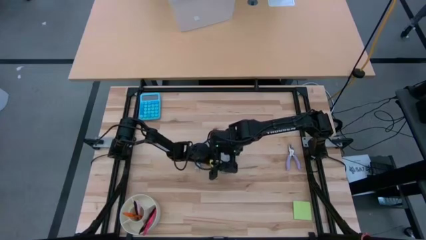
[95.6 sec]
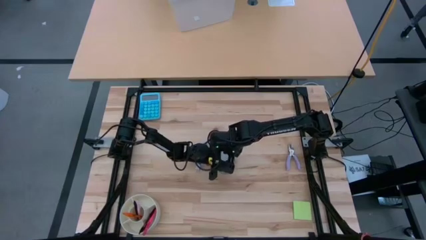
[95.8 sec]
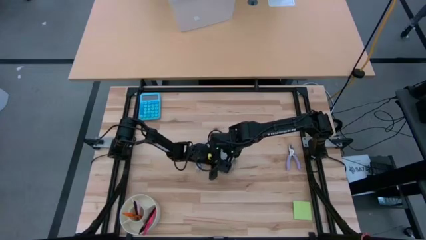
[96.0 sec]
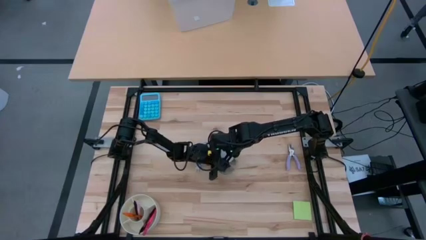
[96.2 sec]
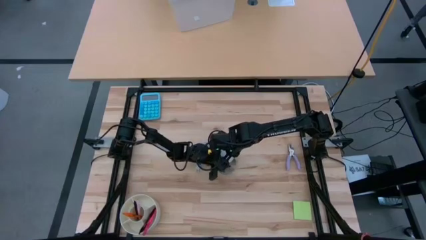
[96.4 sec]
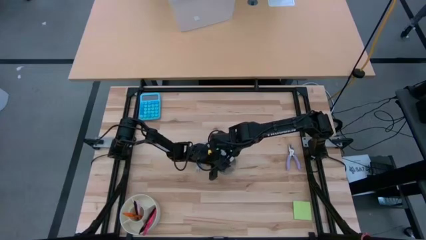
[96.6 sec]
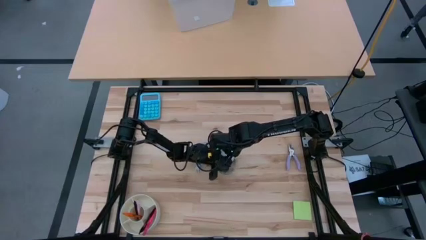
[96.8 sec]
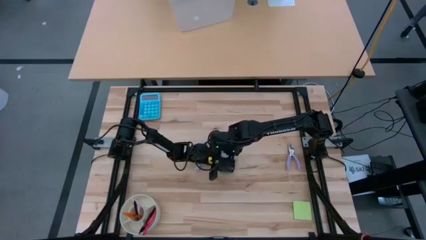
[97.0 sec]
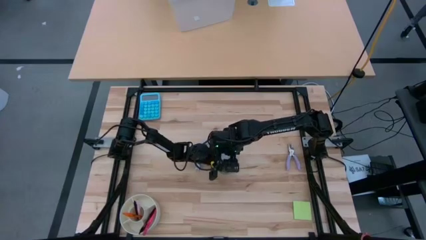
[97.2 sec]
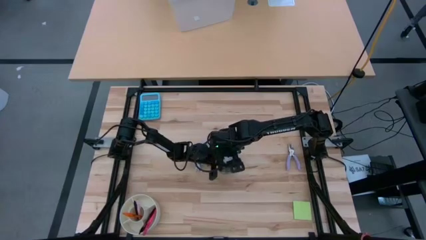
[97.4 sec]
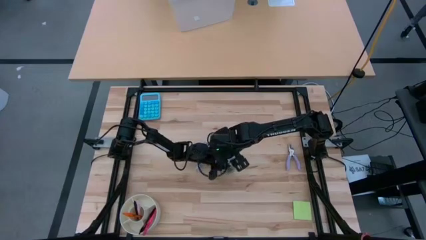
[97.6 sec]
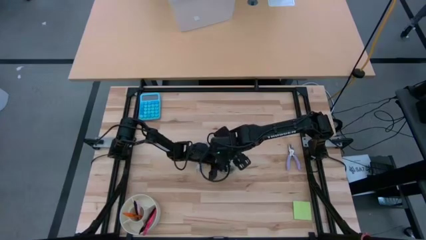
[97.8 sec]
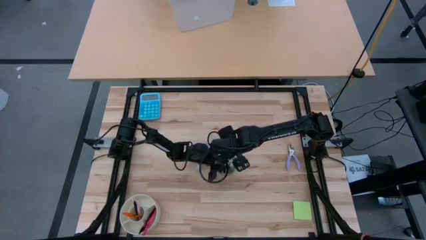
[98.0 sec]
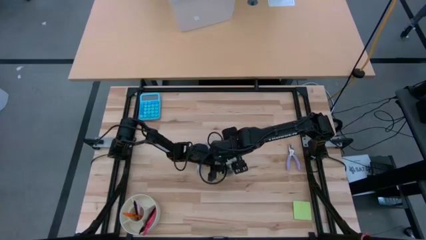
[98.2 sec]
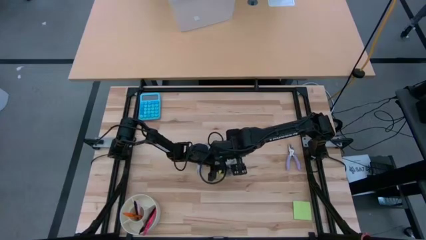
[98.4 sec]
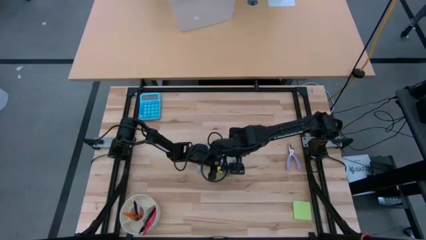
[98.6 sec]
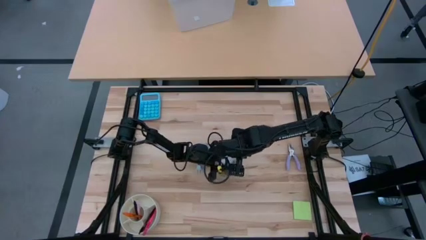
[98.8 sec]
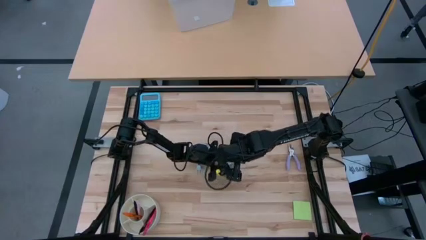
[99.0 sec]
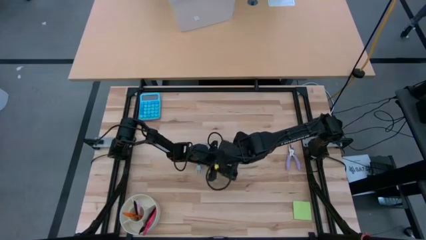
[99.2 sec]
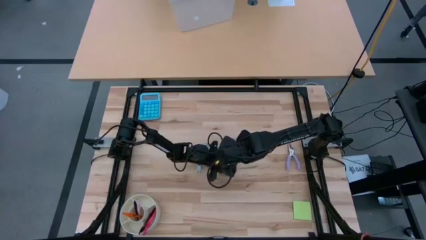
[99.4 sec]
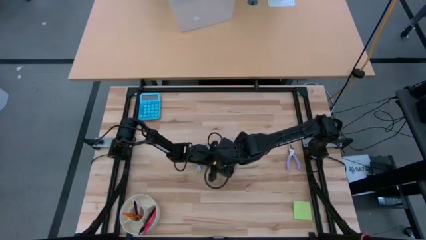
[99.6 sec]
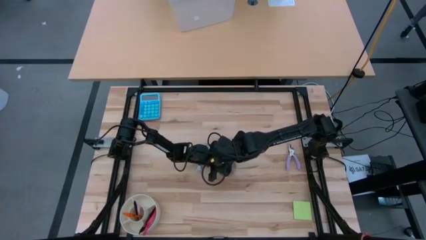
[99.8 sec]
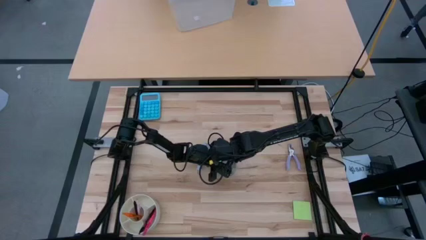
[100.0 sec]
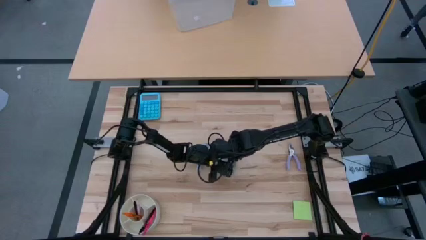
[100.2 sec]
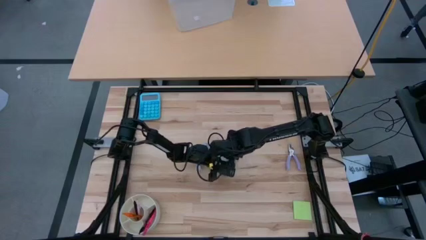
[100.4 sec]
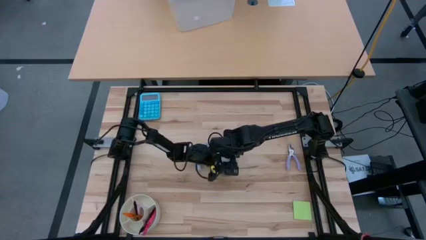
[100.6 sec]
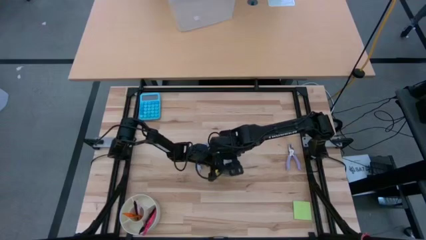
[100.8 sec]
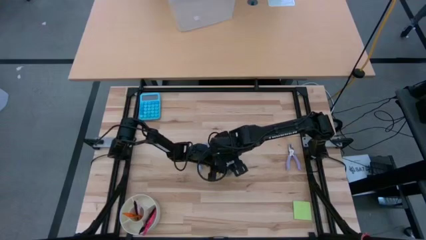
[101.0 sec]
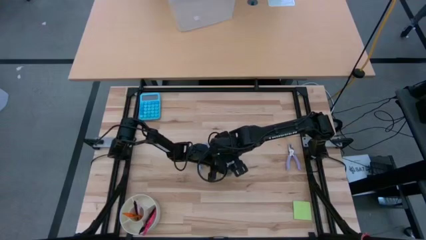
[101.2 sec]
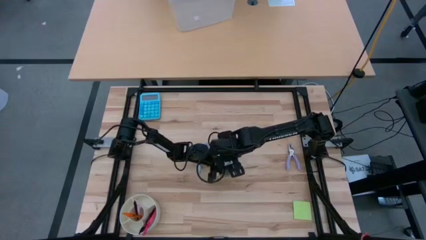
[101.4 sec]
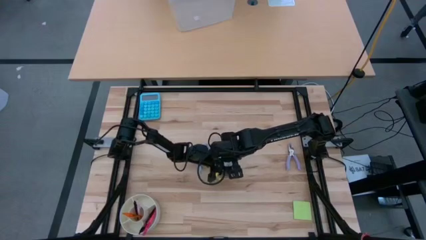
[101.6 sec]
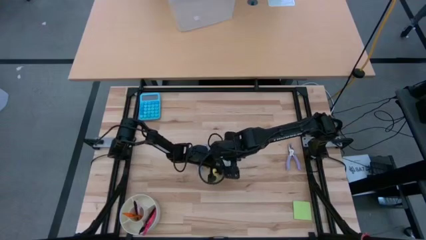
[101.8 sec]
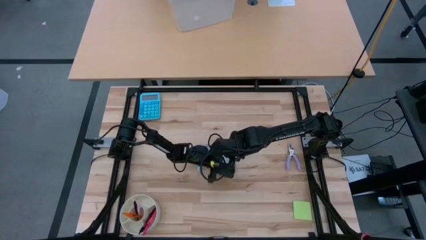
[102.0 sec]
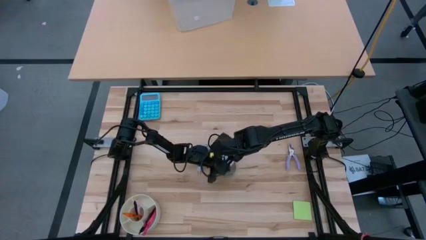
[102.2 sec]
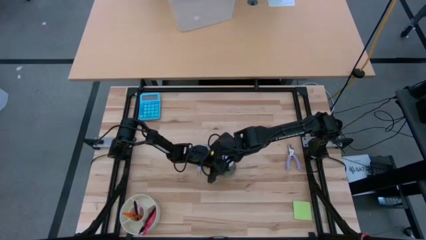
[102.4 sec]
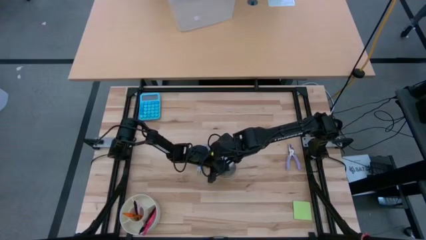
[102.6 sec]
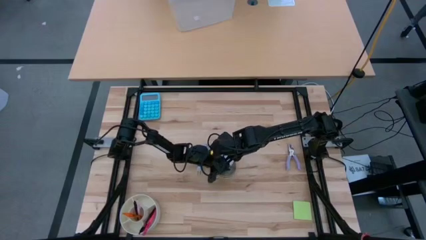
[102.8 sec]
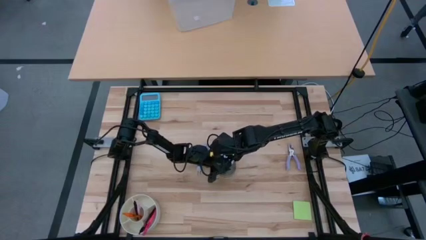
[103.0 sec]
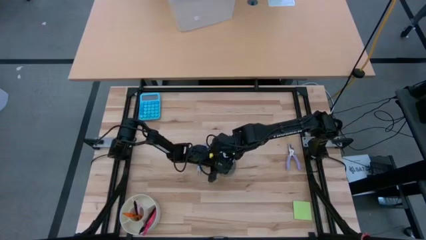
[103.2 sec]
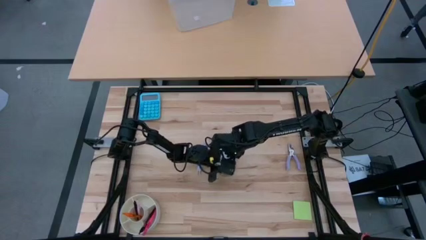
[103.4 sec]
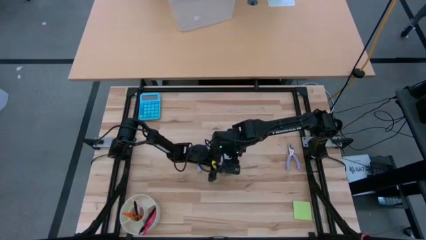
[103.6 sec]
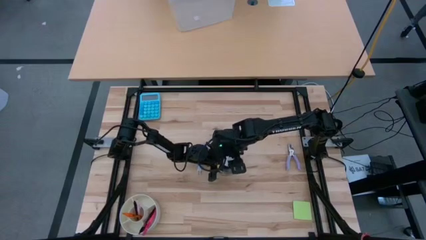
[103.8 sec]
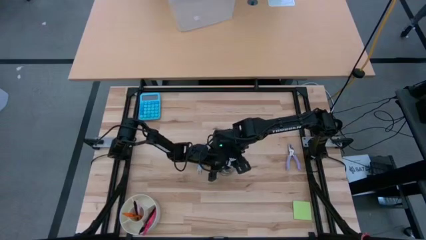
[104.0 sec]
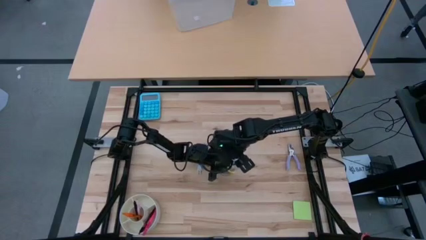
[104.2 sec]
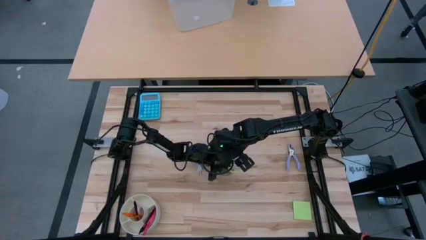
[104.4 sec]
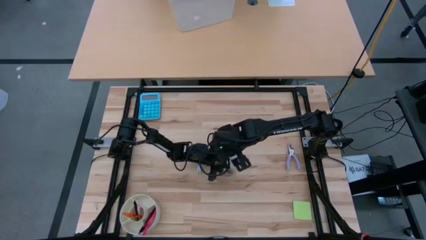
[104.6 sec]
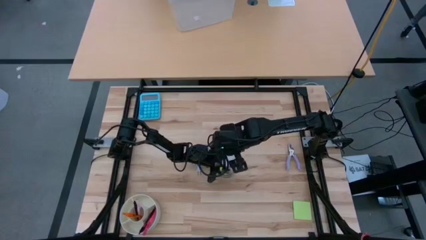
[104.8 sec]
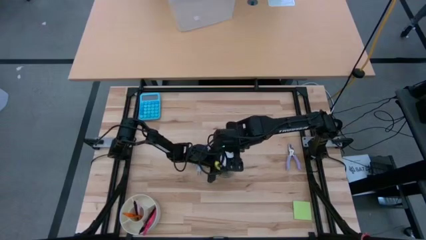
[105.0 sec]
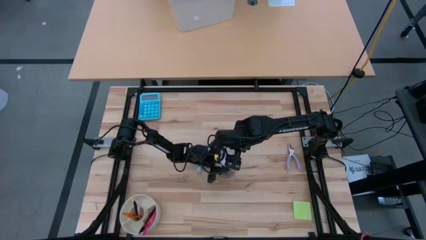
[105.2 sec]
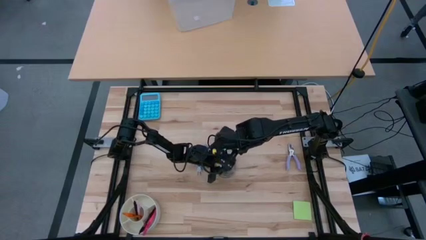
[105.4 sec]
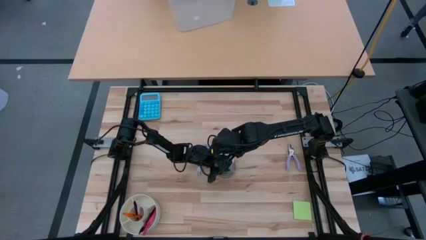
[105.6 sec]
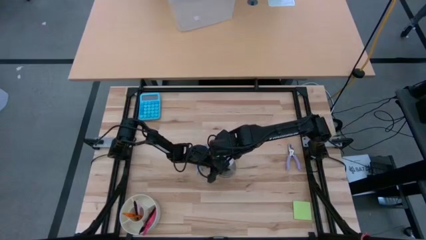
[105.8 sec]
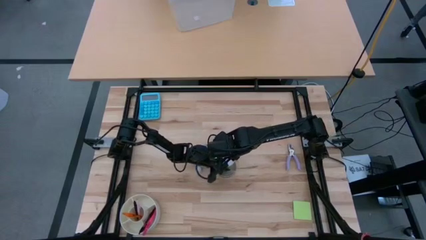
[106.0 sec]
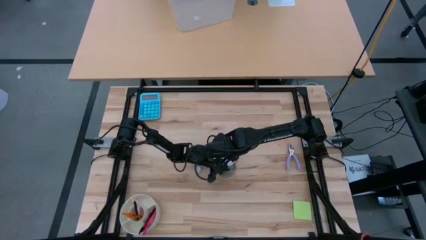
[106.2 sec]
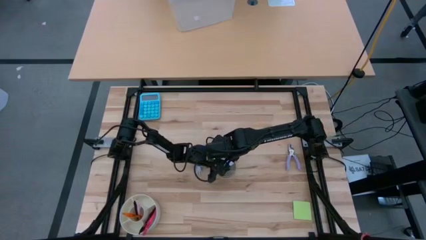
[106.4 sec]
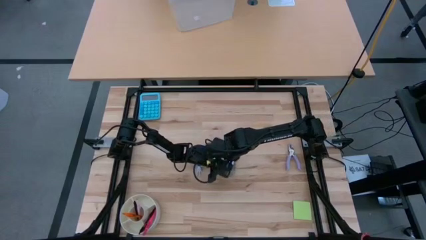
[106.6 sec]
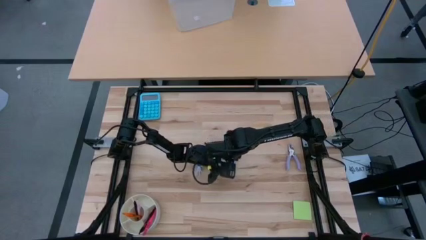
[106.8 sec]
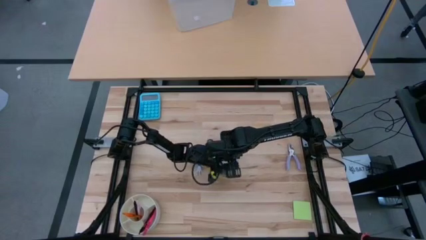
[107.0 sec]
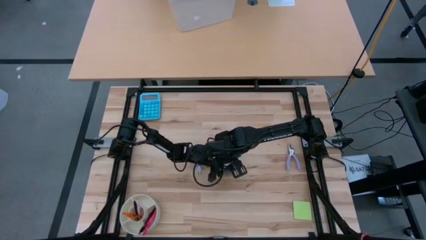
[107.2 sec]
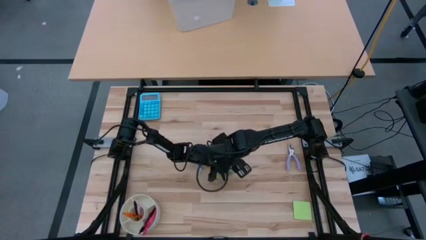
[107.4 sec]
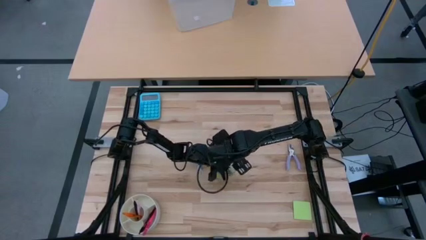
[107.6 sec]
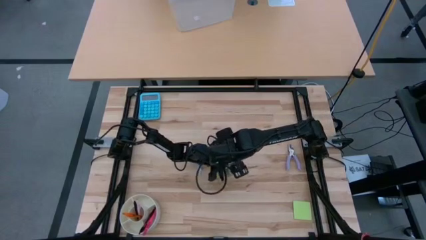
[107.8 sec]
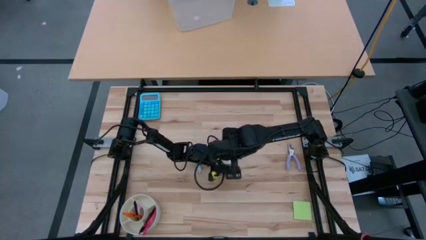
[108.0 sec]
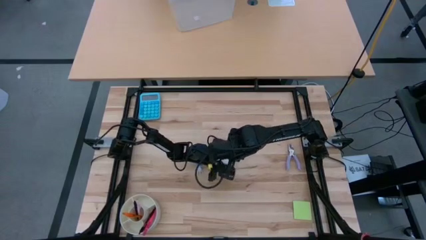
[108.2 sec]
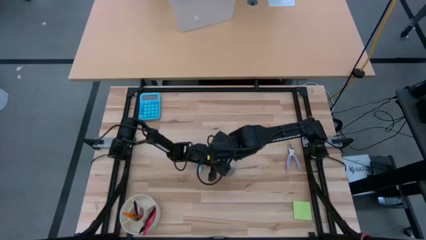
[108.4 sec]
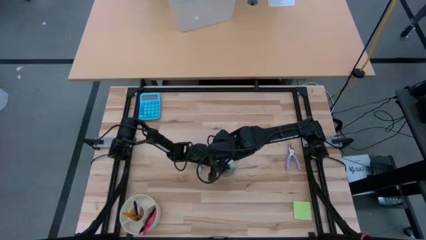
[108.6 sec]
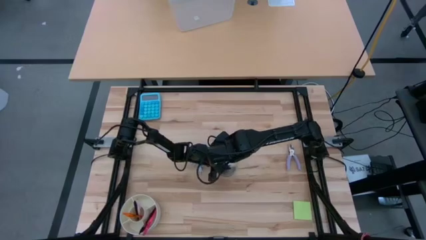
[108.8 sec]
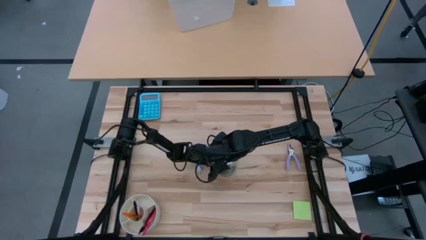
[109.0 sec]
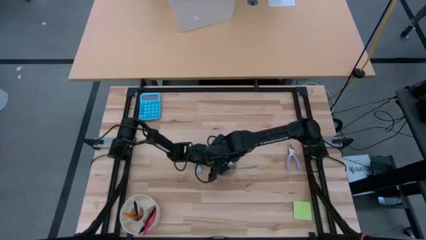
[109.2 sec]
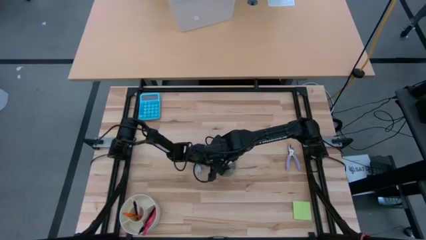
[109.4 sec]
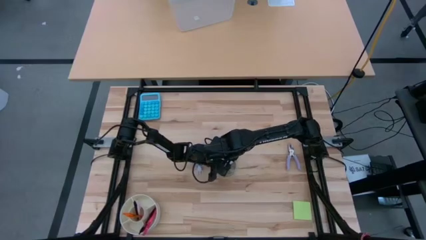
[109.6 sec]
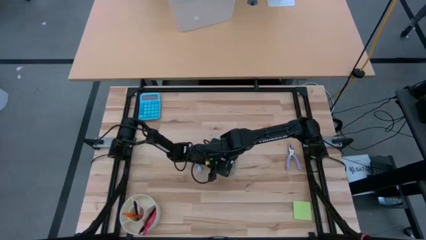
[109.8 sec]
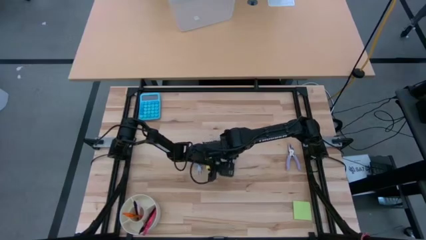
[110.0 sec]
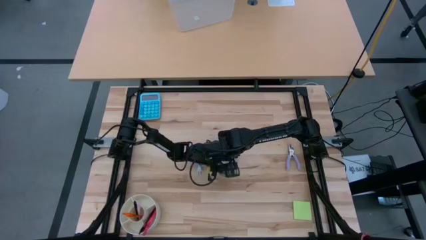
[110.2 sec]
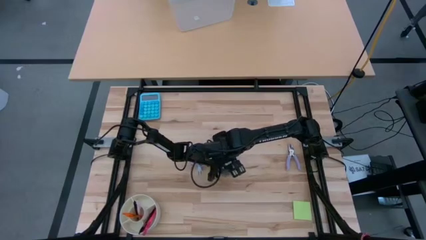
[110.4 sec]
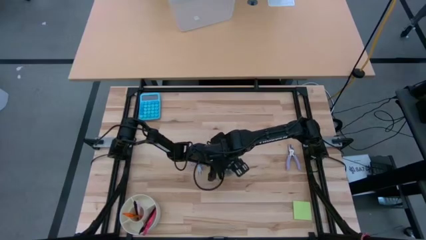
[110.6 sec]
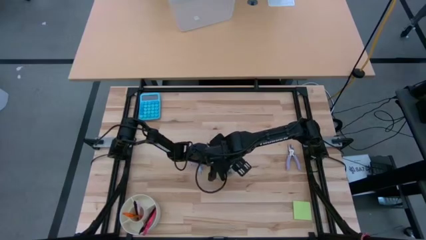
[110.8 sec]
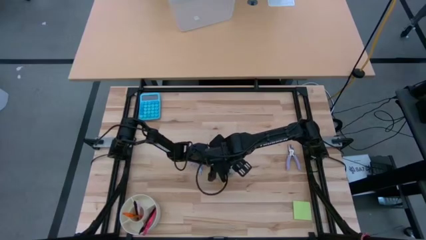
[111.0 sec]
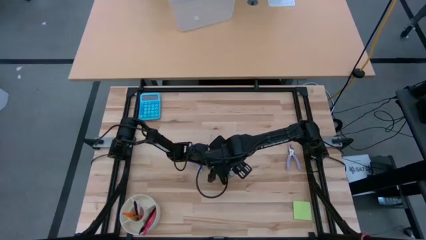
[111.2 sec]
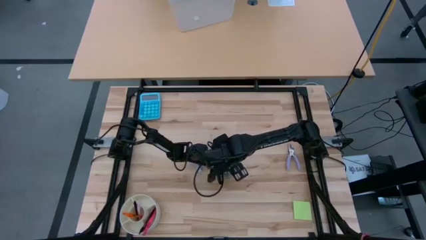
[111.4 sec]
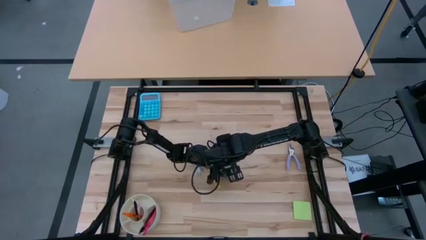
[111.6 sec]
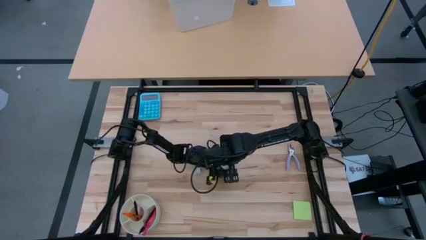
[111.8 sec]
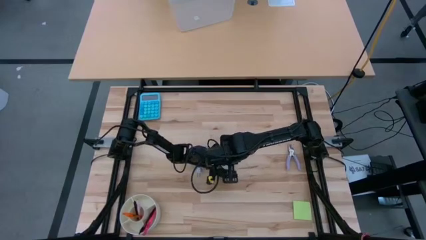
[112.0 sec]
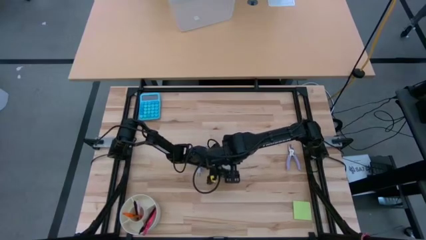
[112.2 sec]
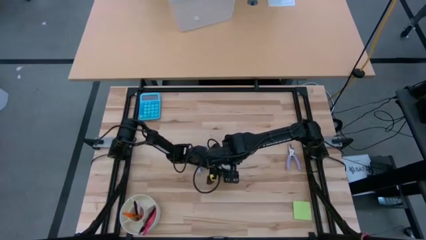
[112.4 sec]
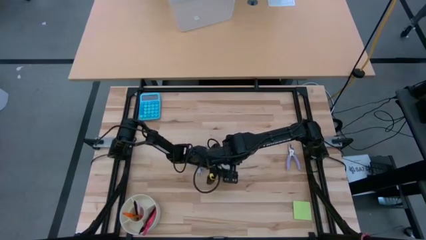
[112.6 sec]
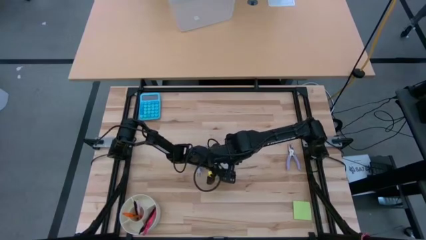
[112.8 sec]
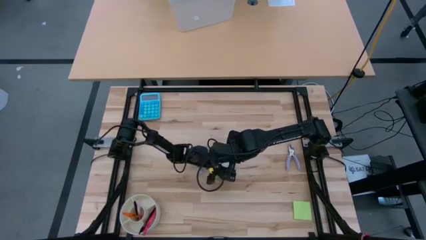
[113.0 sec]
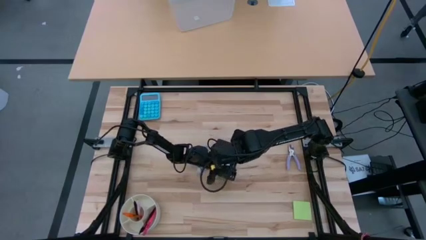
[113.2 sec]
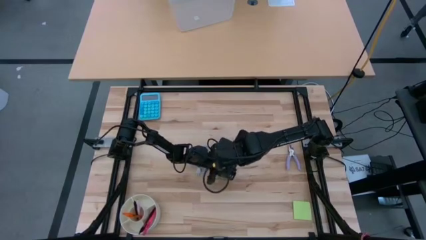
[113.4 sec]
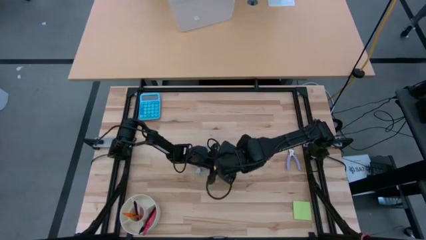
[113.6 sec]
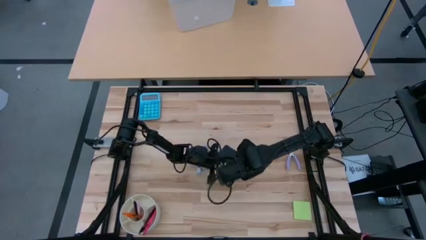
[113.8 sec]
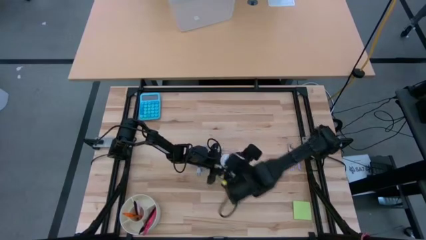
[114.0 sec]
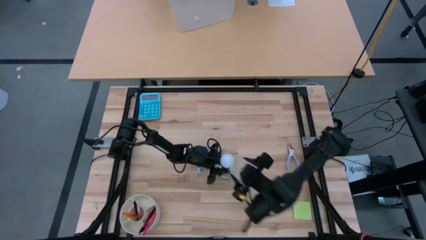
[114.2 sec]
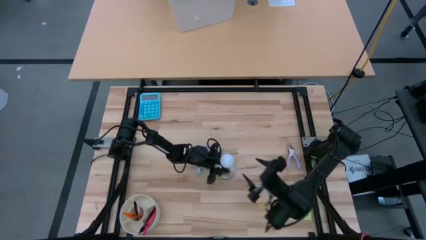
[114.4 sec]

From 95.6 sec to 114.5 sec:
Task: Screw lightbulb
Remove the light bulb from the lamp
